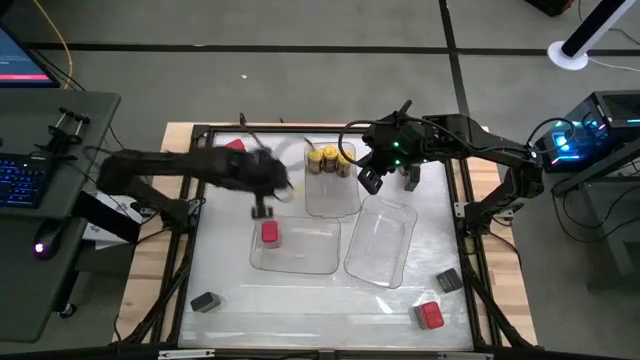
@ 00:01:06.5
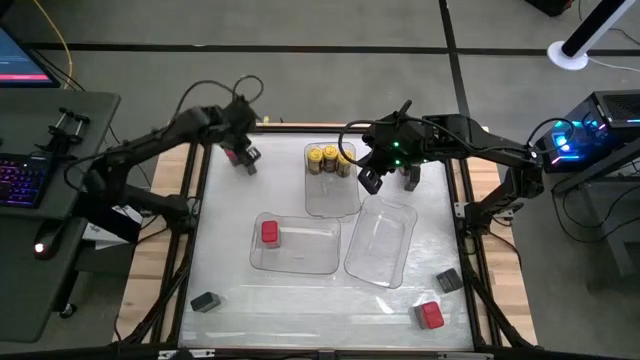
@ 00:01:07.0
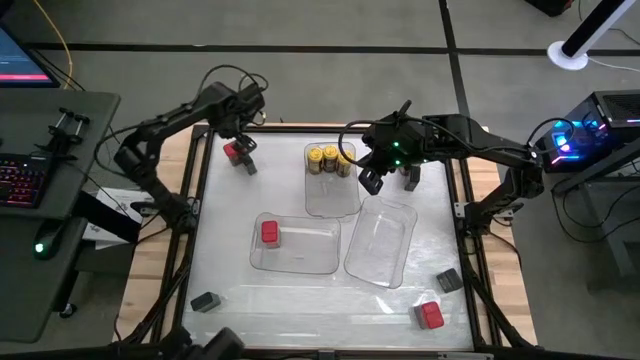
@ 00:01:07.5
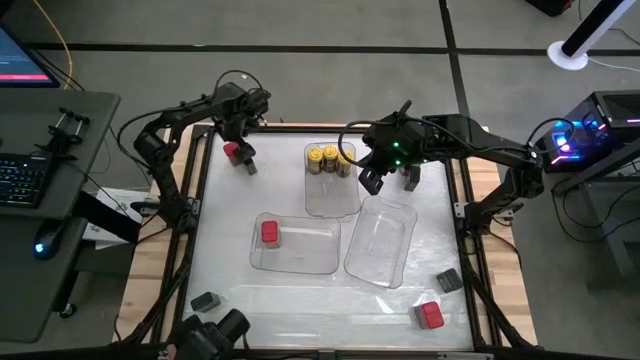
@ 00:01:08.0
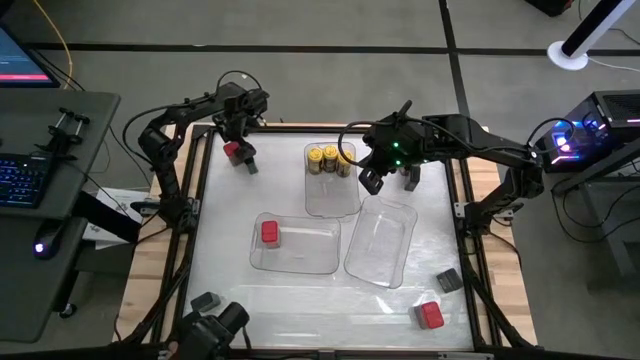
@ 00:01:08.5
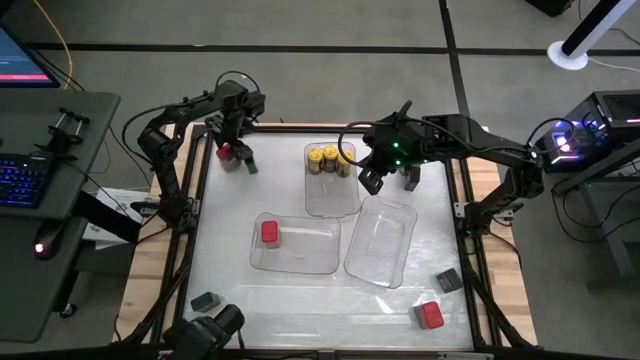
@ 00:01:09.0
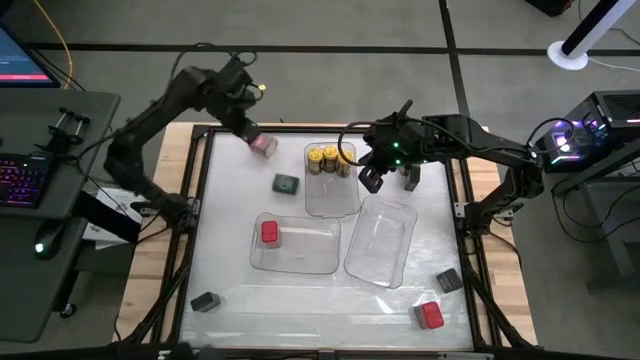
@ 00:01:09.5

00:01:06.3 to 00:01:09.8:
Task: Sort spices by type
Put the top left red seasoning can into the left transparent bin

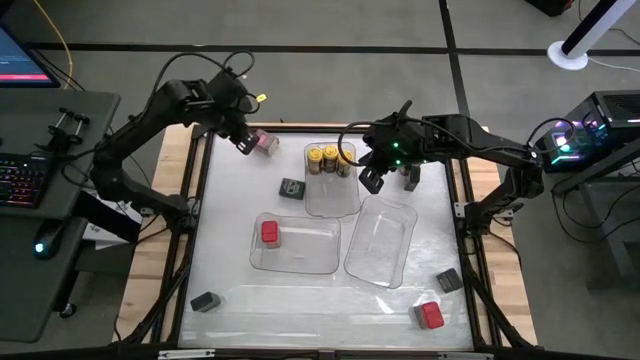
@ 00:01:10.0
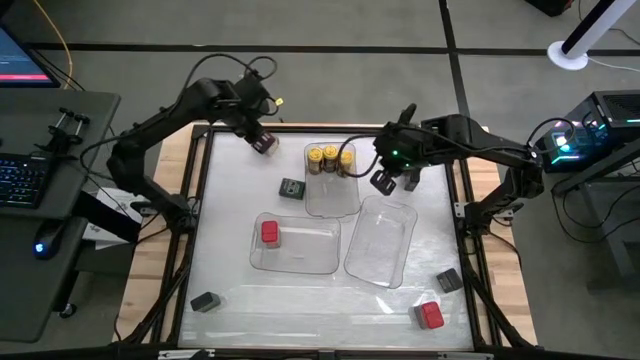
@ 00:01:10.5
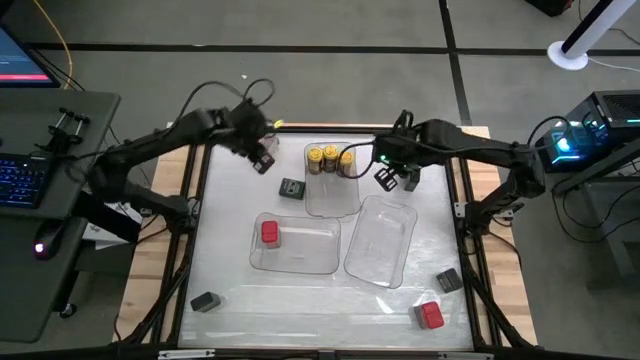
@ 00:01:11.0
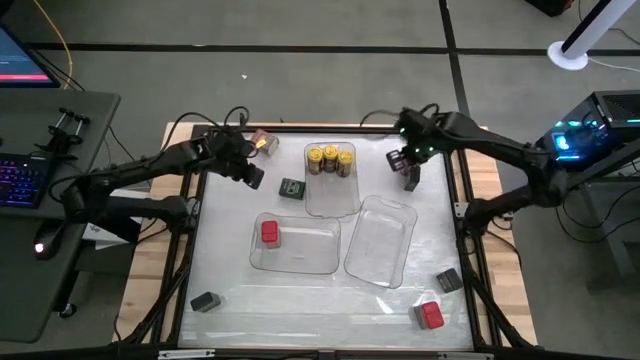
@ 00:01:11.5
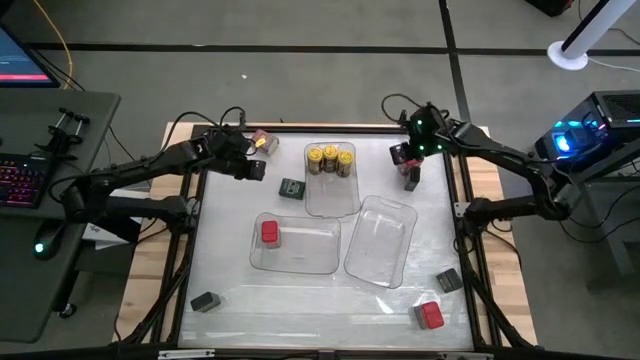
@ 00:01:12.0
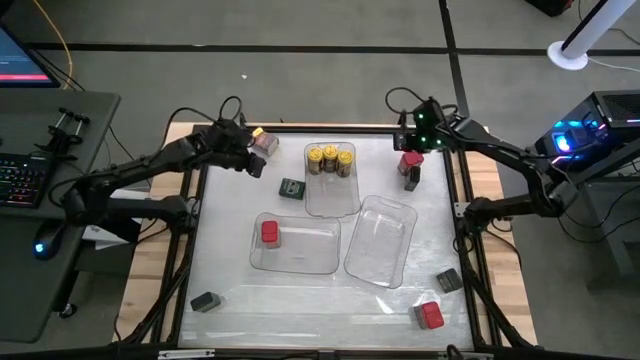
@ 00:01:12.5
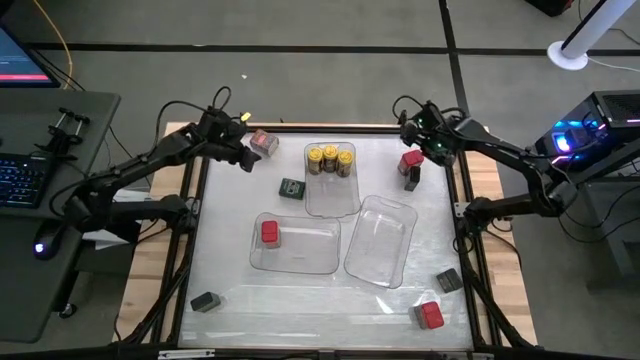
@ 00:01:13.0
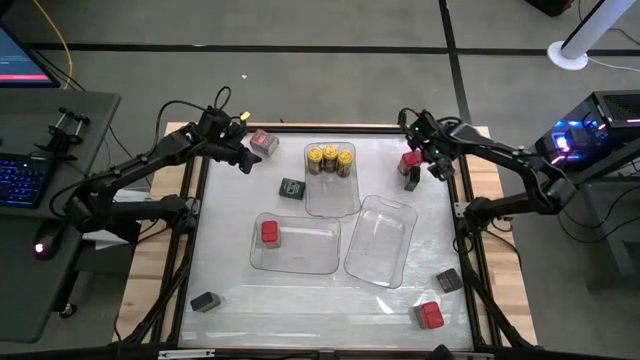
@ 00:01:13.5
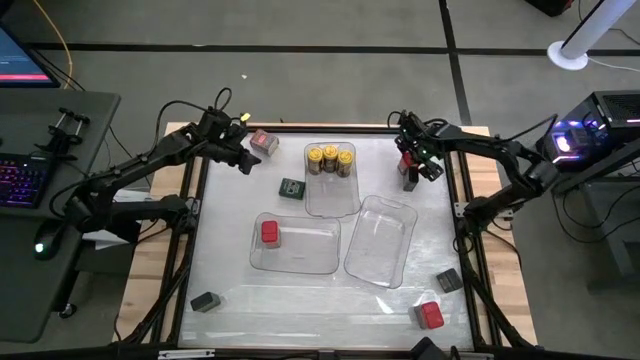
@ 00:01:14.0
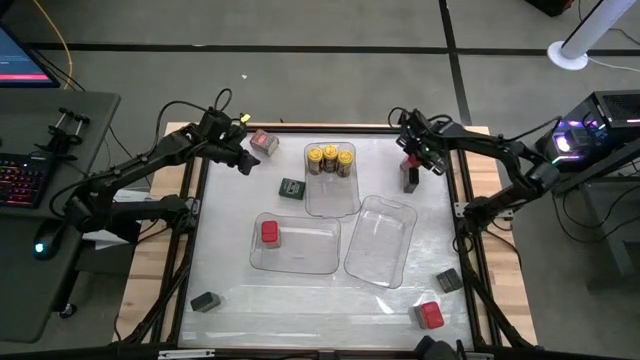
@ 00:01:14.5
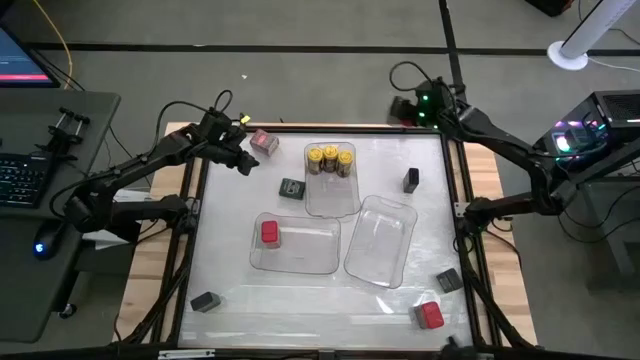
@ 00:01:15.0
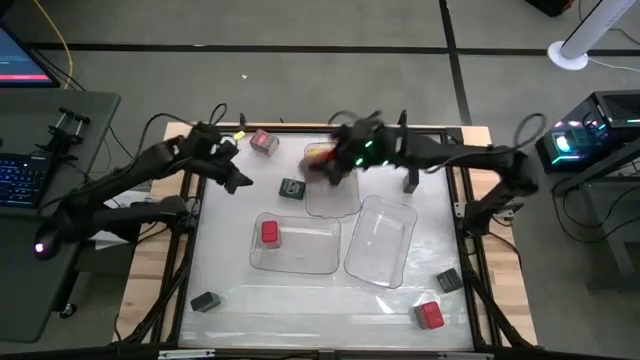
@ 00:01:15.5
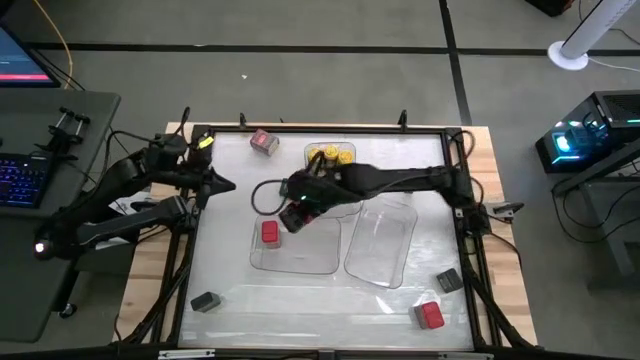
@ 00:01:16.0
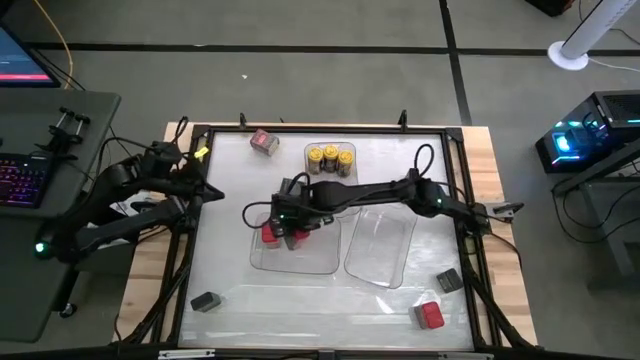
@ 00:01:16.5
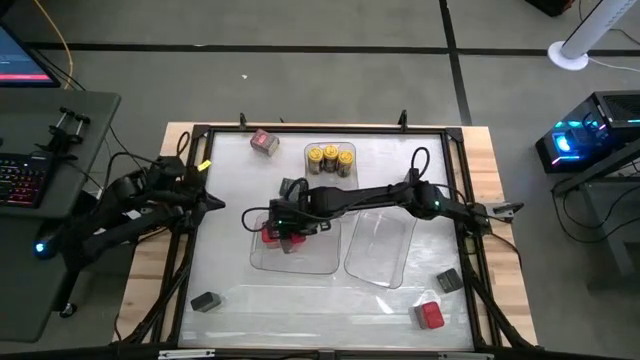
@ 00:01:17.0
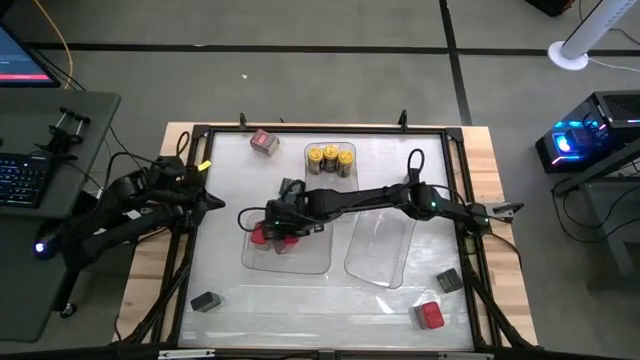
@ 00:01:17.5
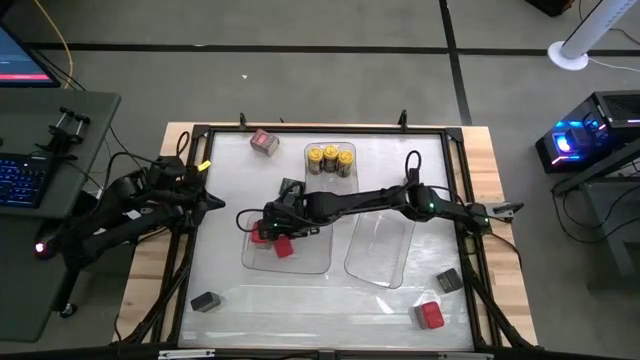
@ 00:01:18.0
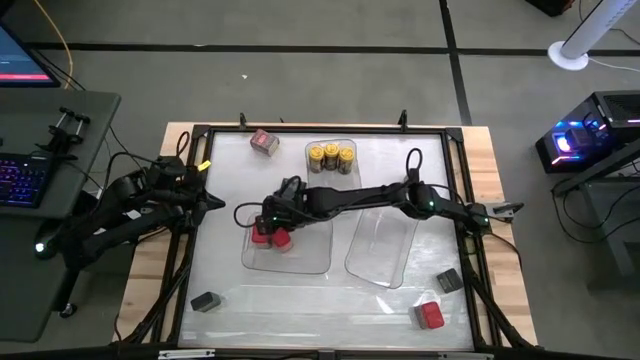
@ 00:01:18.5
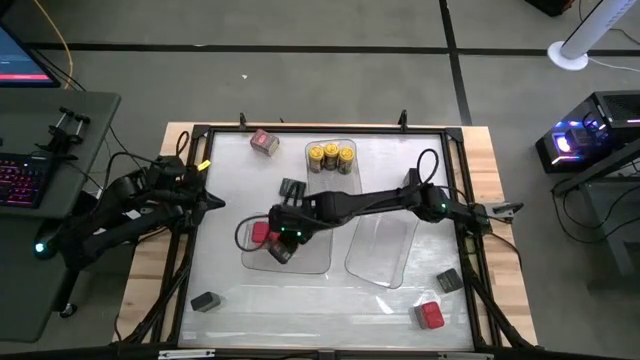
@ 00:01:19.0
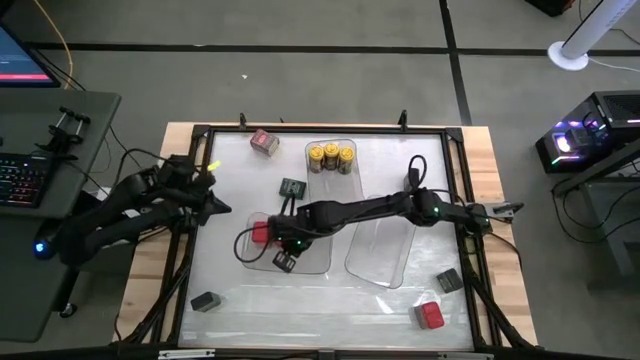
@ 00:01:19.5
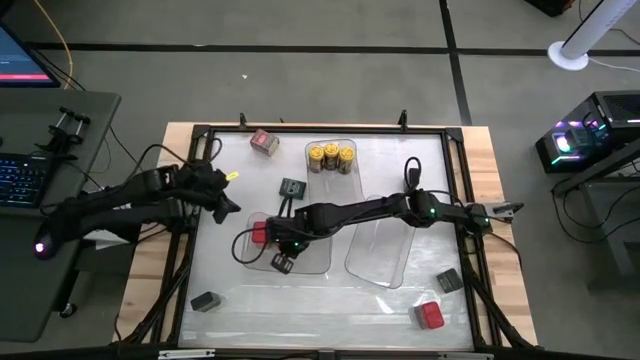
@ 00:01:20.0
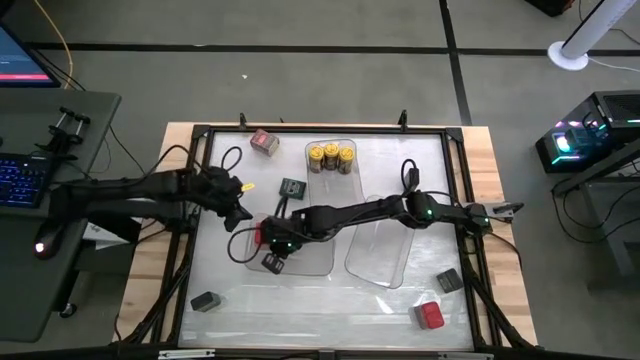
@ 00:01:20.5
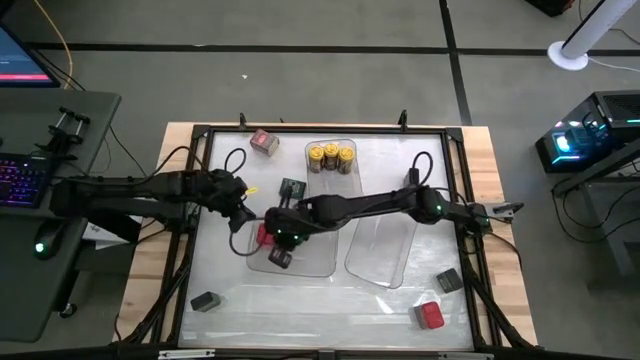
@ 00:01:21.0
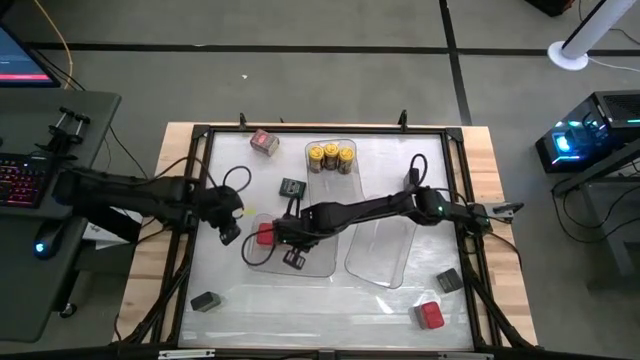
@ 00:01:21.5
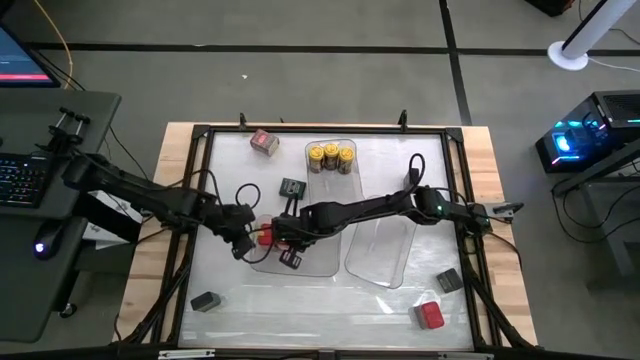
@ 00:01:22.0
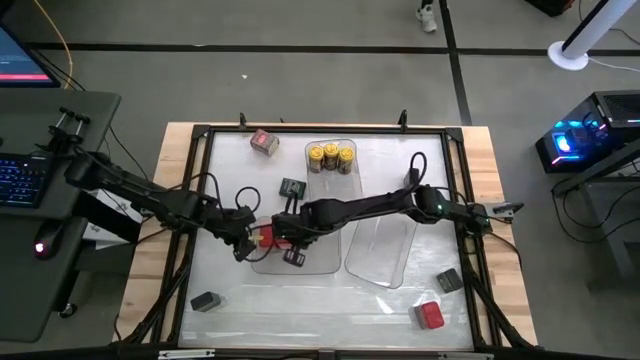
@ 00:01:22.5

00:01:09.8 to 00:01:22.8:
Put the top right red seasoning can into the left transparent bin

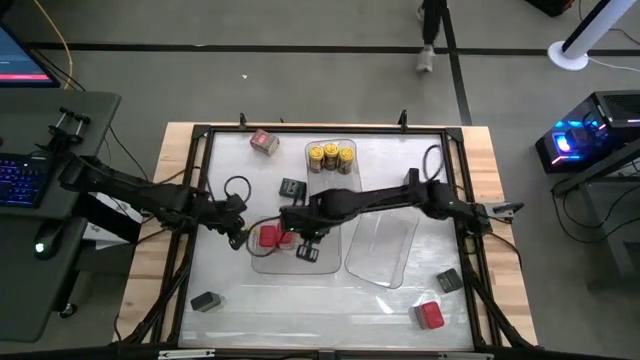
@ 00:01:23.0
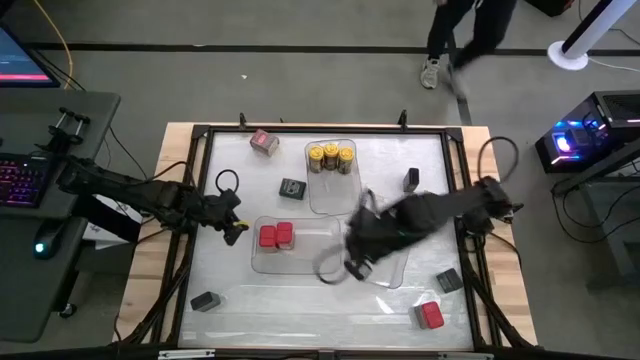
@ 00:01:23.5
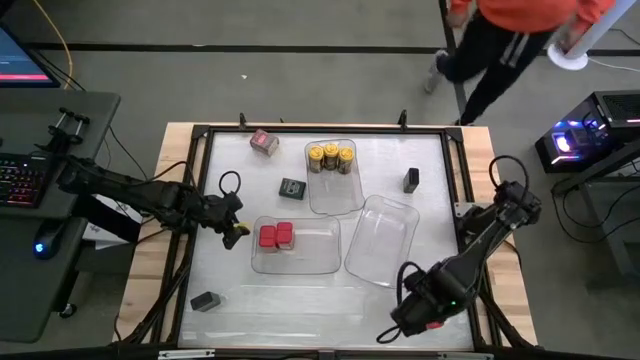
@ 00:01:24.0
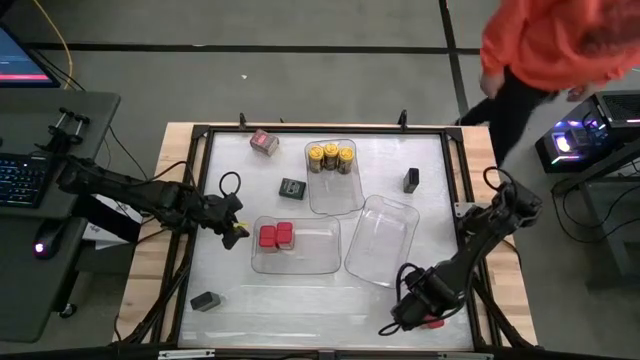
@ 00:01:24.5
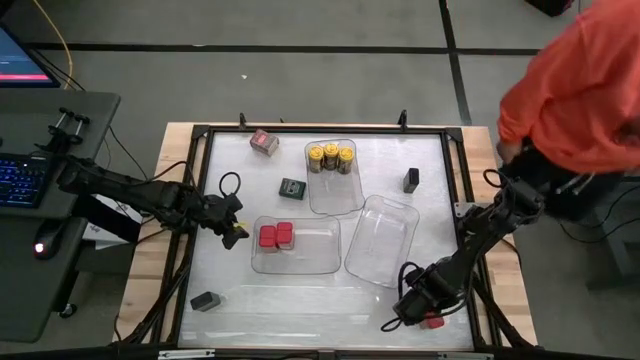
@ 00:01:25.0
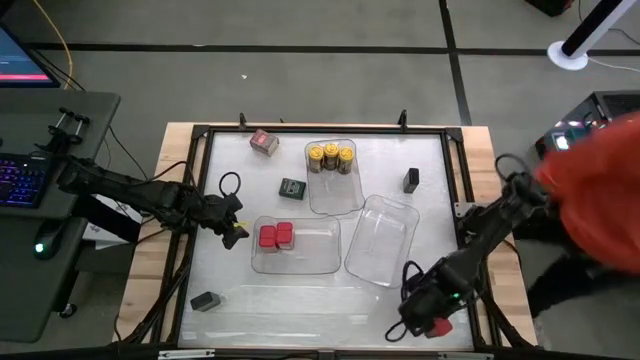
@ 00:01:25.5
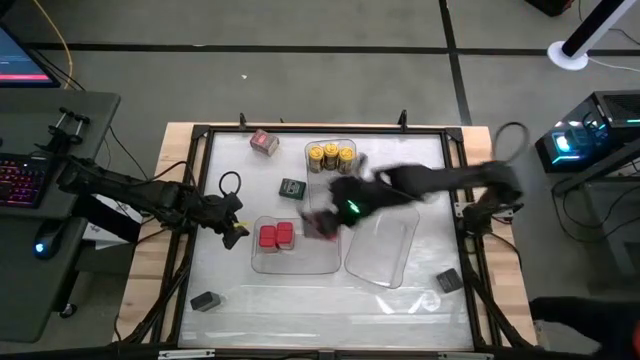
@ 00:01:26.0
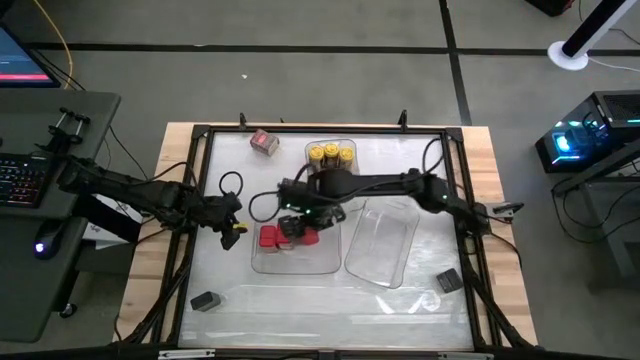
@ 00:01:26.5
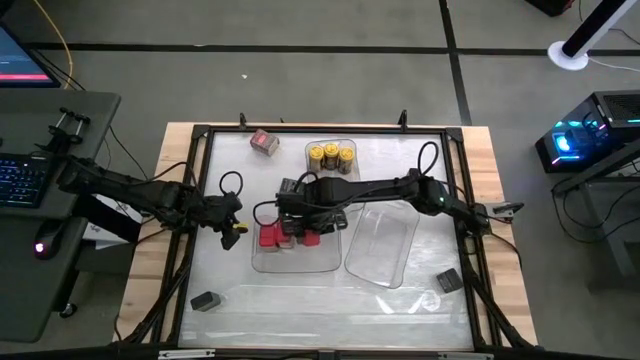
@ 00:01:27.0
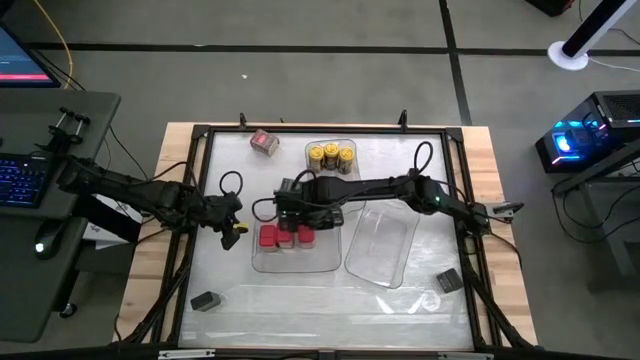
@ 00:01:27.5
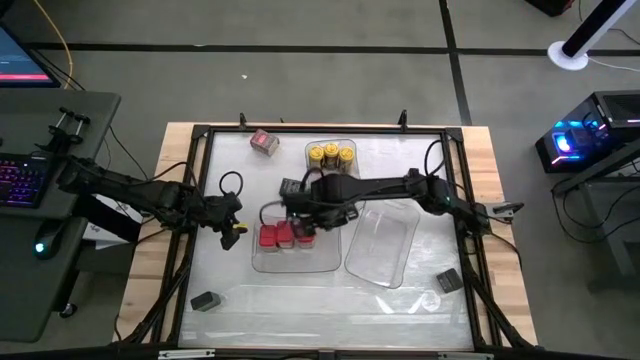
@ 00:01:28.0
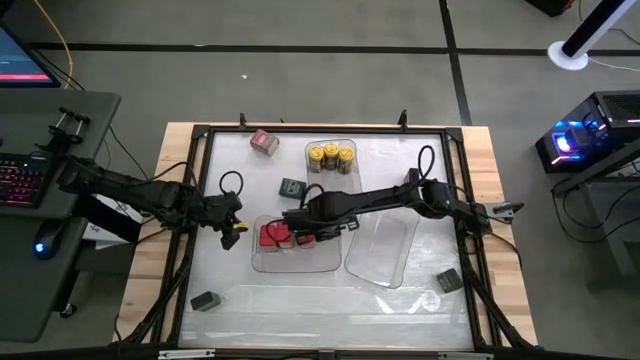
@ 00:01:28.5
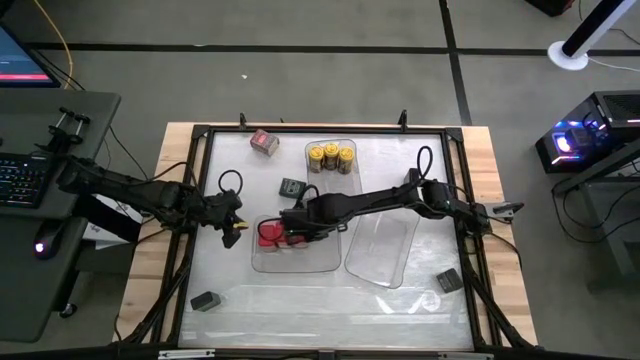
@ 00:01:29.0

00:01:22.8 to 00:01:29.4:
Put the bottom red seasoning can into the left transparent bin
